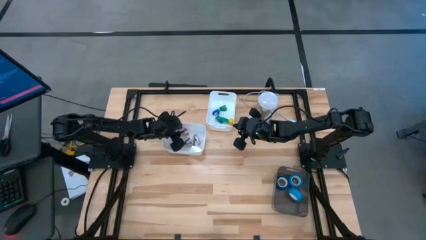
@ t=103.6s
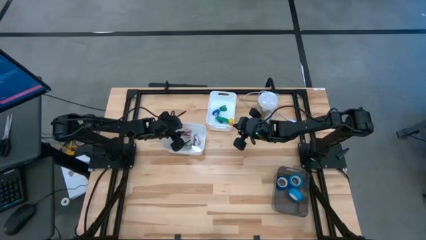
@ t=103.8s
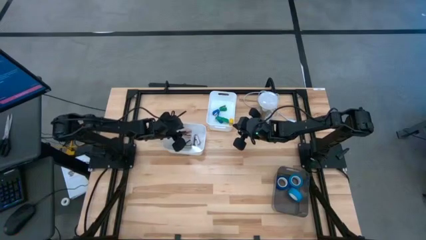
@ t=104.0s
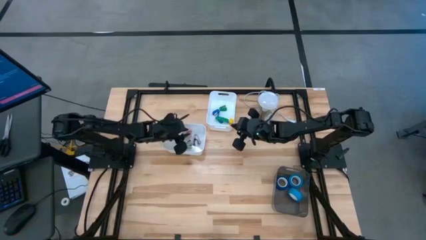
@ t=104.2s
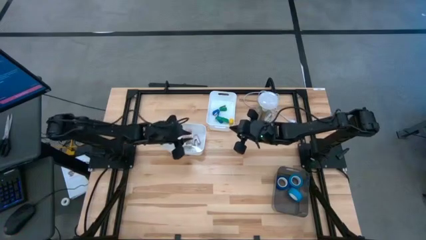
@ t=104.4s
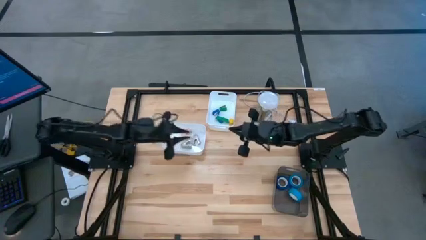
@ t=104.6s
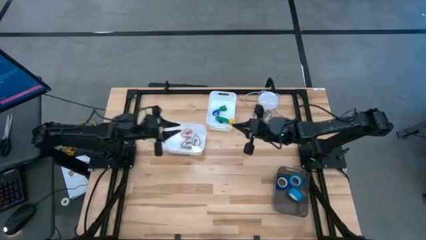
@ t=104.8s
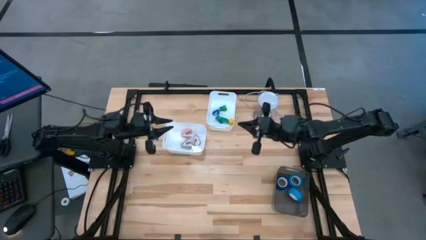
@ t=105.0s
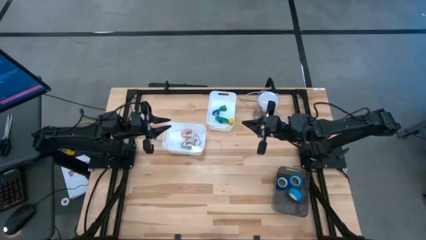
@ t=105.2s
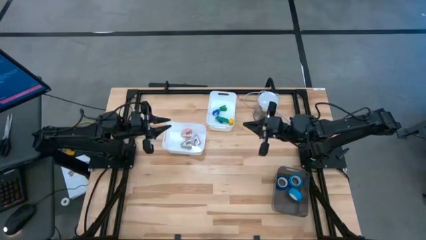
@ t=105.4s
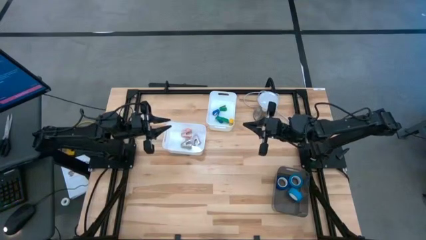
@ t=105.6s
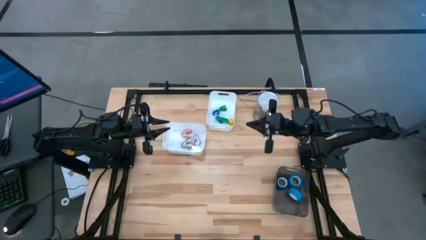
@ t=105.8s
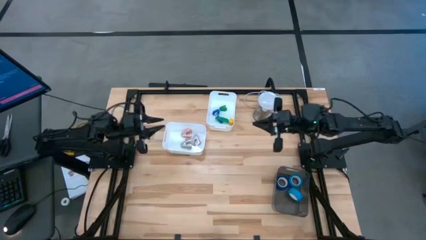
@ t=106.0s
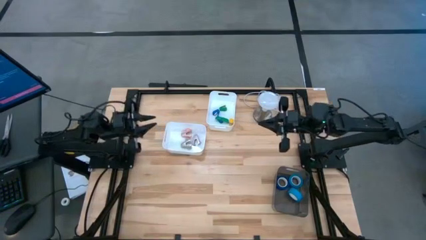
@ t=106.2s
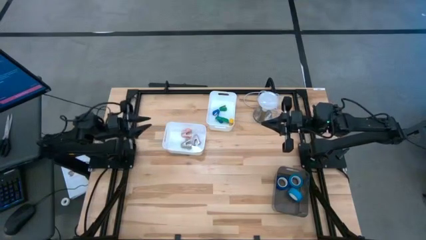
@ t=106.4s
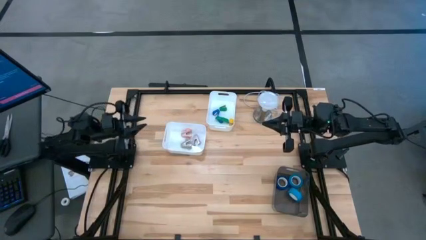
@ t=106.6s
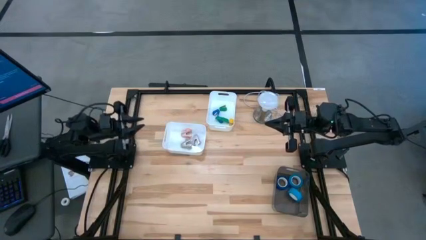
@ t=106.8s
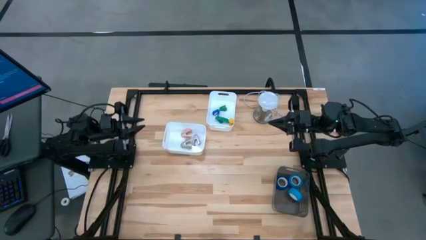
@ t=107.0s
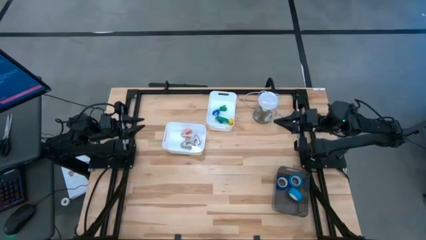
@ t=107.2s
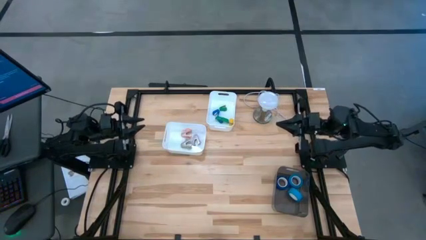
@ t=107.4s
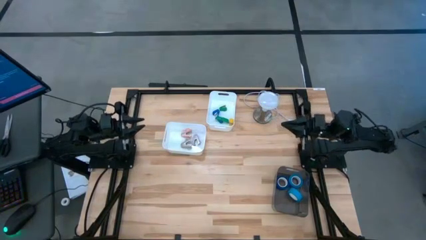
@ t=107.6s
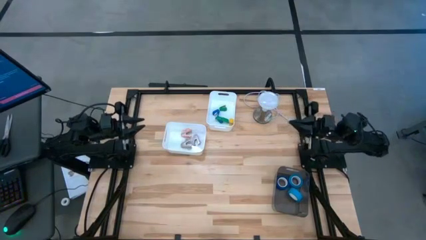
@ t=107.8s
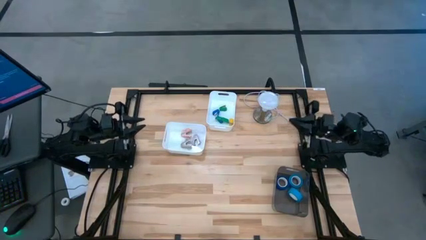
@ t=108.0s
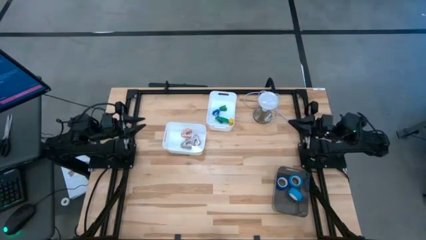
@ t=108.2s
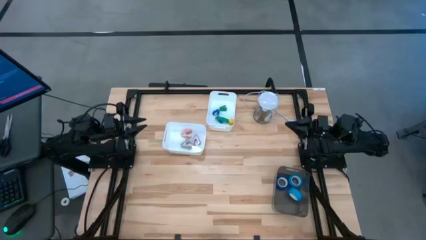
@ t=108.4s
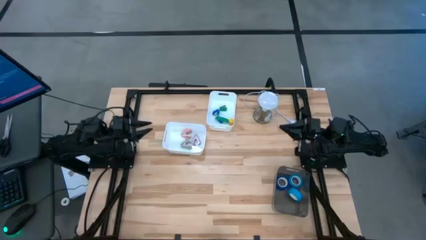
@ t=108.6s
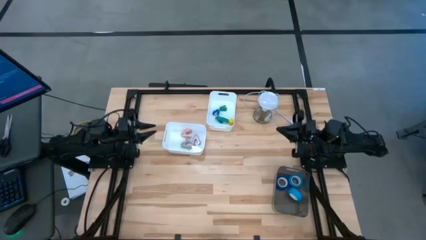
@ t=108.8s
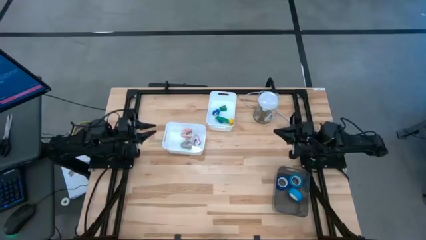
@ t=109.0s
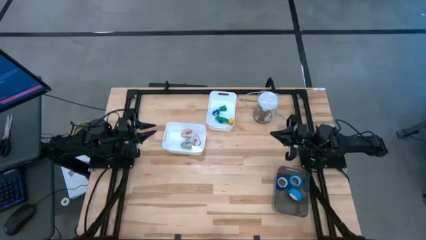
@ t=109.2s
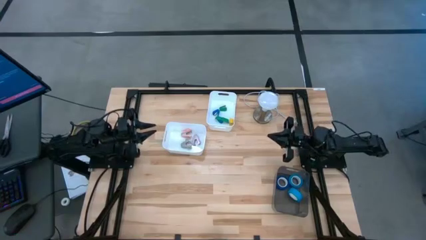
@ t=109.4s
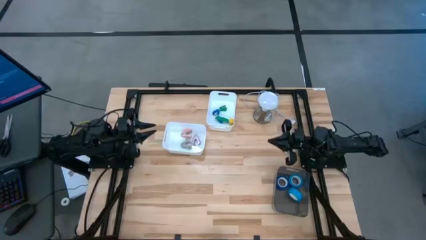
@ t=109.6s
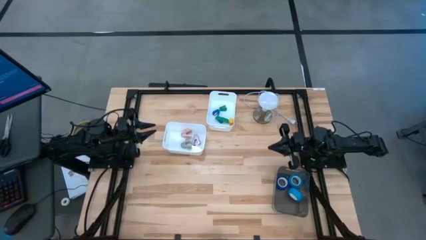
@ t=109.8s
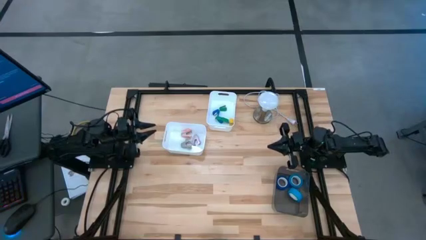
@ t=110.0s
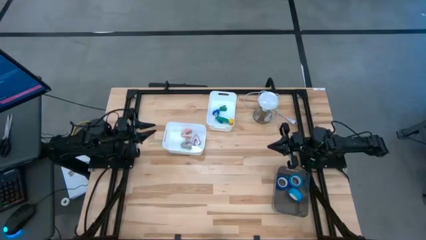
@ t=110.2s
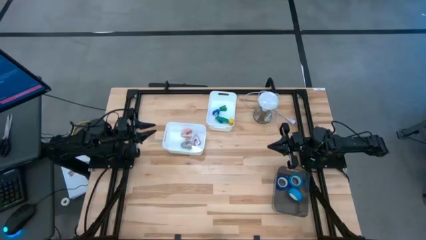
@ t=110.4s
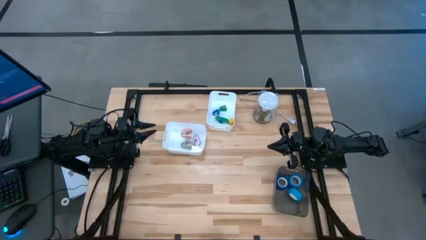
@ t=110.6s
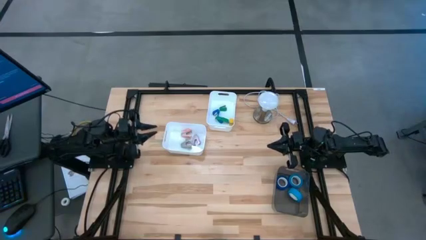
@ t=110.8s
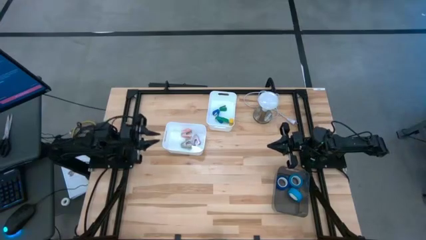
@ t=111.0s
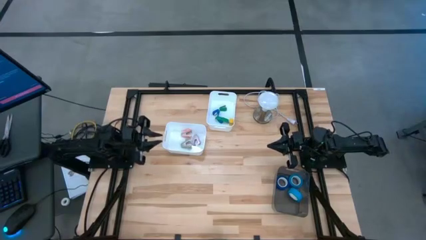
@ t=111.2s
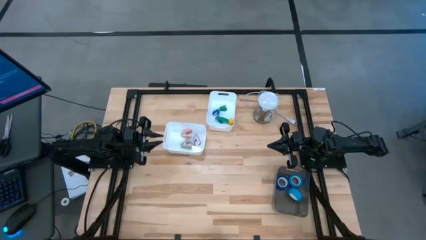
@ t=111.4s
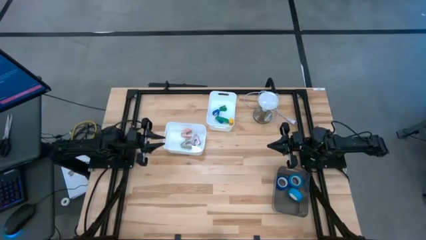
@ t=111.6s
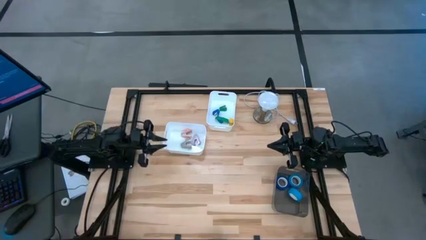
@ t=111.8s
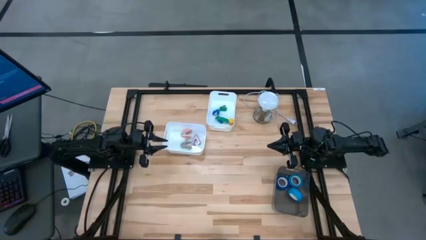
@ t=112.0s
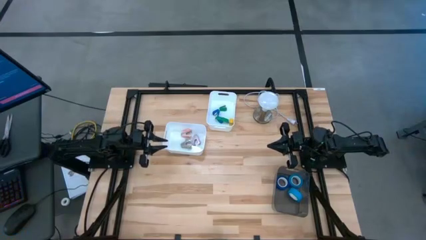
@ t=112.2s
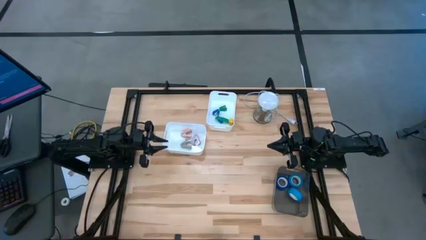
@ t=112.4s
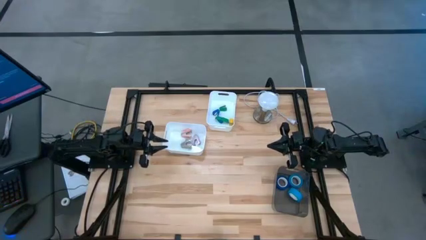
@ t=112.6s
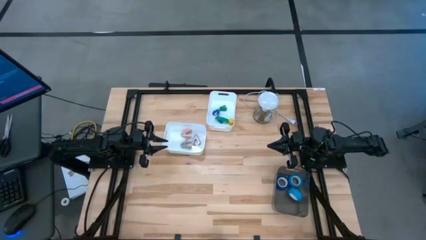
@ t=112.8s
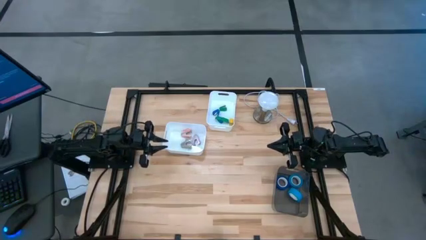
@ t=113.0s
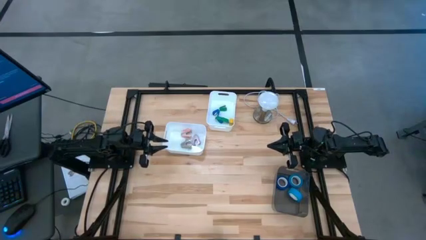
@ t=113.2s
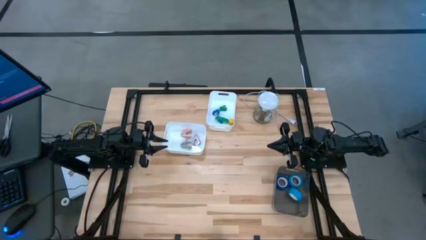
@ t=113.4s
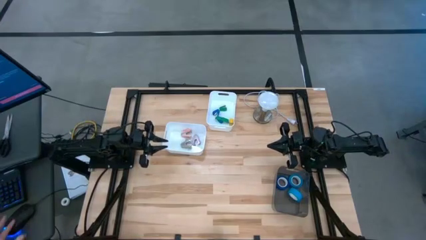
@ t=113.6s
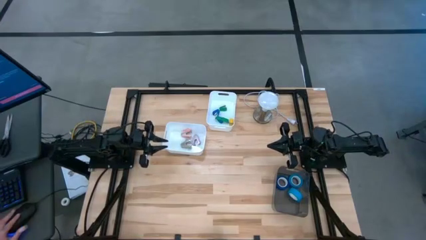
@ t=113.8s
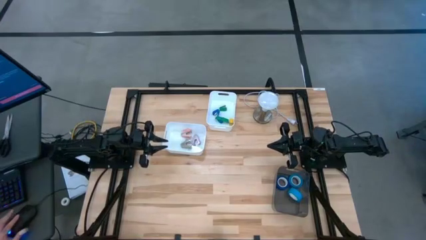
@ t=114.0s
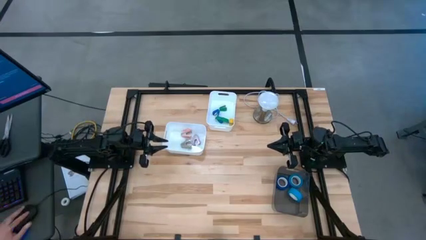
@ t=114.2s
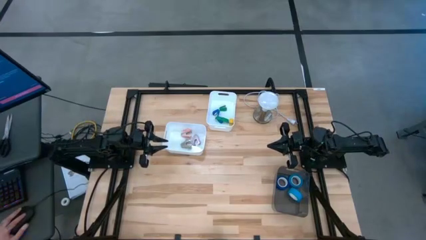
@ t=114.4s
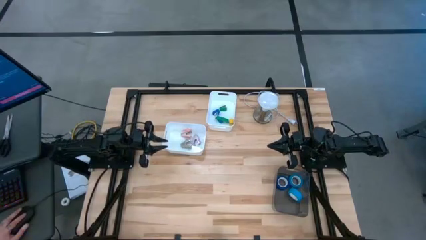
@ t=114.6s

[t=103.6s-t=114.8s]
Task: Pick and place Stapler, Stapler remover, tape
Return to Home Position

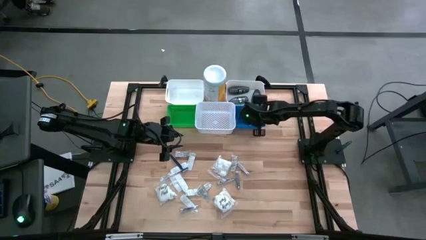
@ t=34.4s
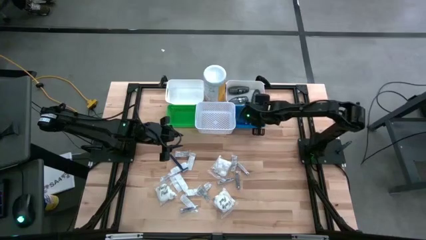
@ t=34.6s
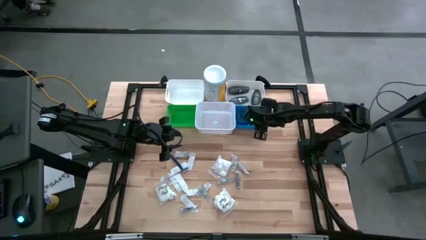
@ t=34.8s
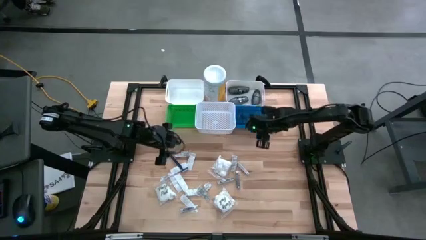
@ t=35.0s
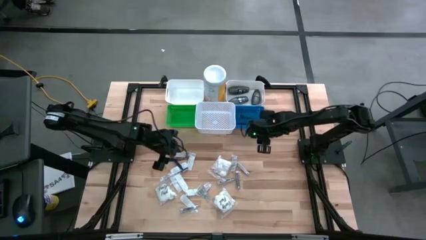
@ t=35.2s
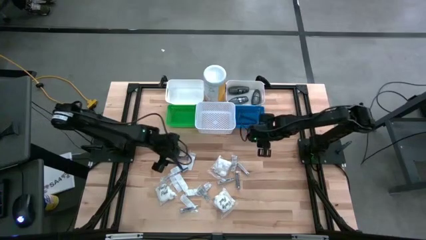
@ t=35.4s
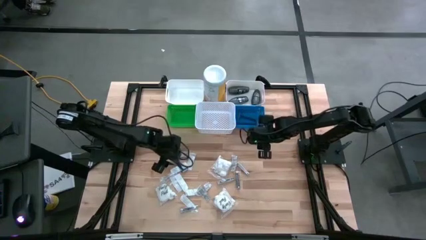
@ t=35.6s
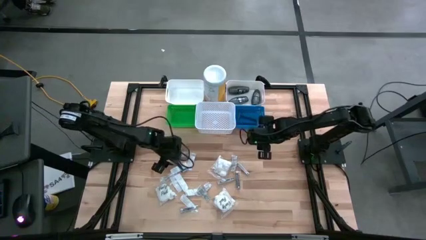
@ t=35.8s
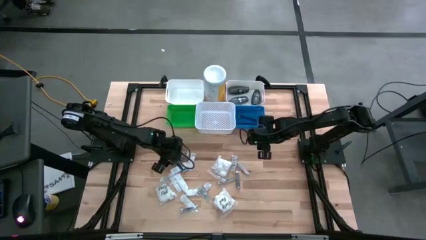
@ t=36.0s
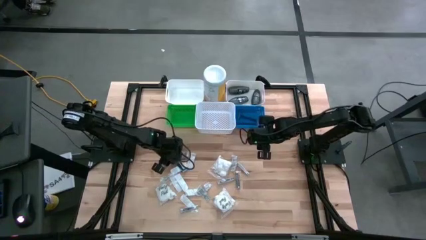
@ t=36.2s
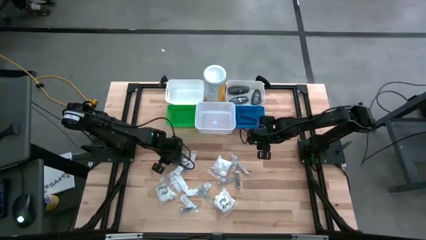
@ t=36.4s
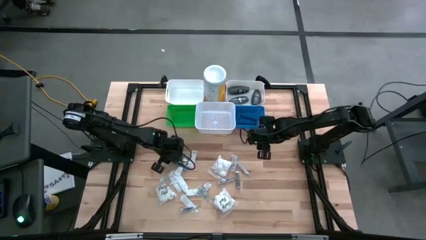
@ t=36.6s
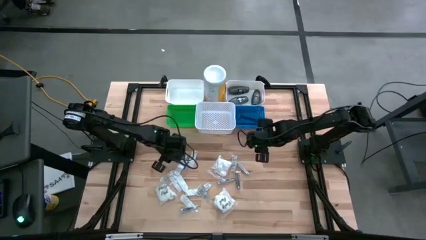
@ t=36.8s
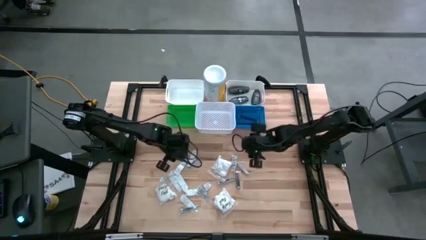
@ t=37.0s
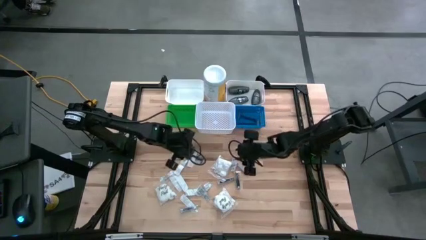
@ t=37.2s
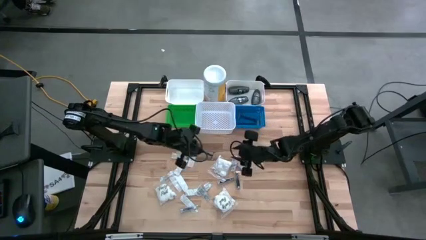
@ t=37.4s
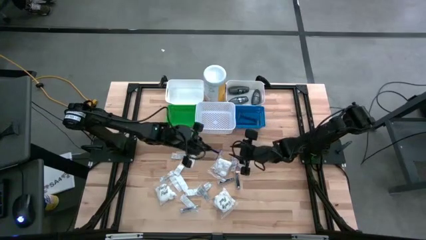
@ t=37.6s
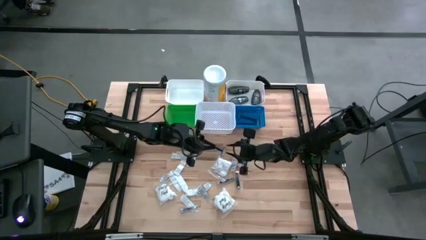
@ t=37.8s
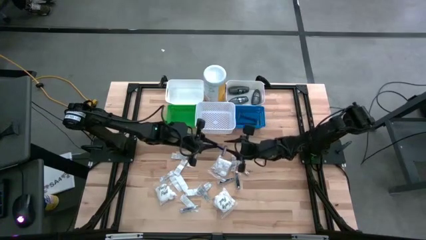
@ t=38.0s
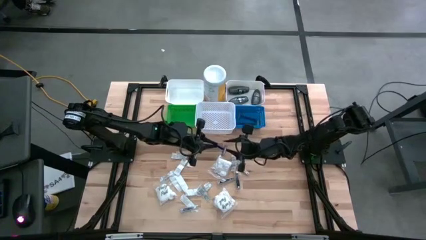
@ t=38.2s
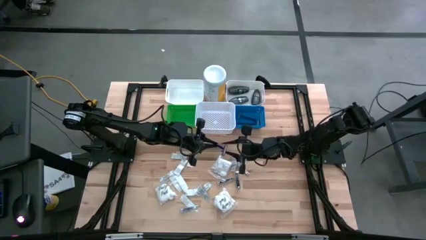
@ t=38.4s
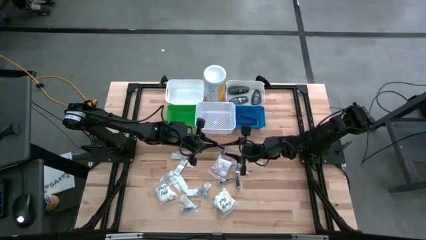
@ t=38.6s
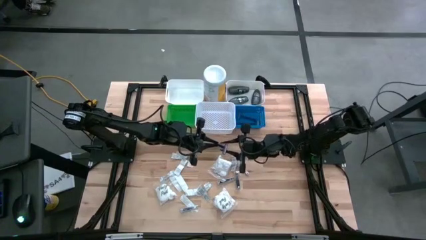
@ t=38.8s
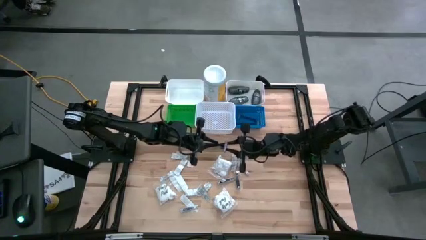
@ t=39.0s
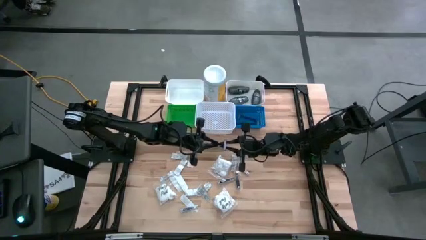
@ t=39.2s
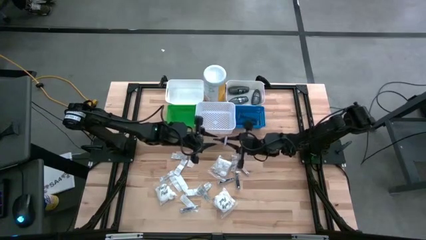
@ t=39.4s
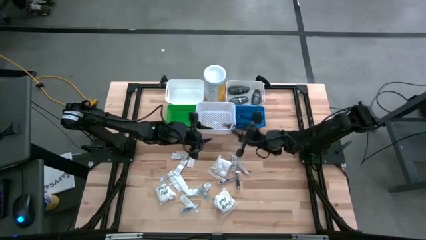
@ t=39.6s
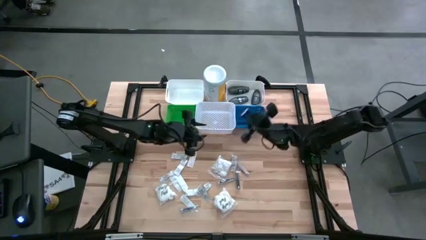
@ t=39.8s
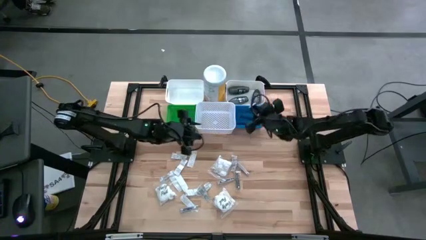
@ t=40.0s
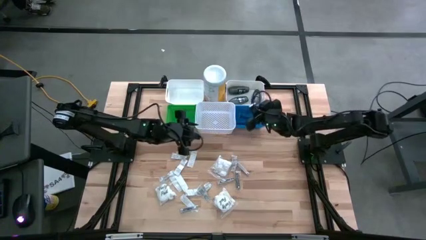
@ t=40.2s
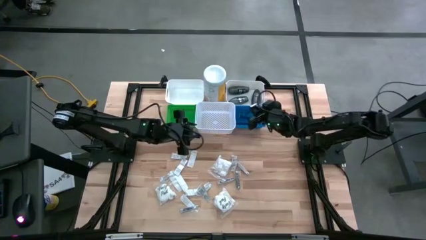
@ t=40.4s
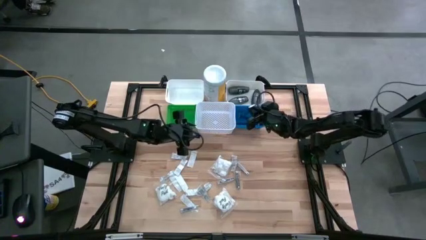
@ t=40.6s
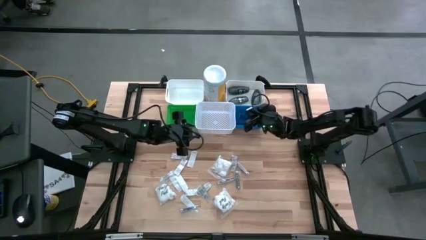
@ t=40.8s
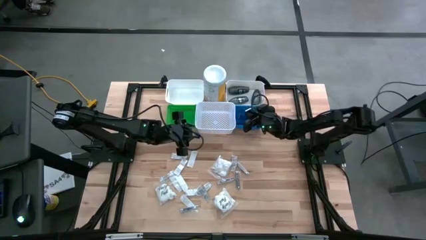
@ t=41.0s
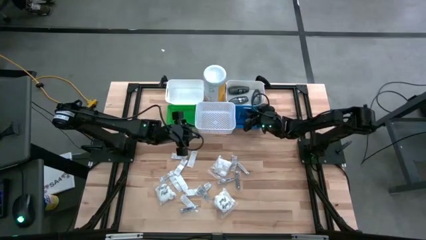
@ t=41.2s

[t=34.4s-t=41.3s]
Task: Pick & Place Travel size toiletries
Put the blue razor into the blue bin
